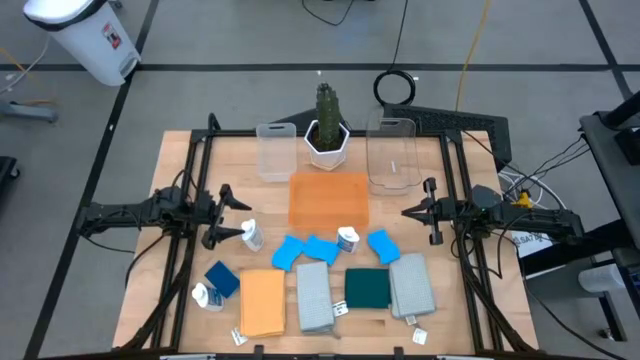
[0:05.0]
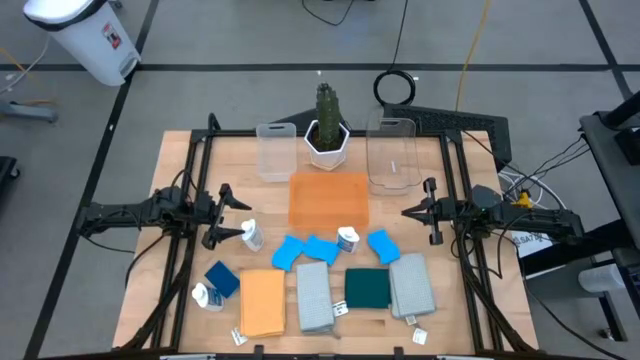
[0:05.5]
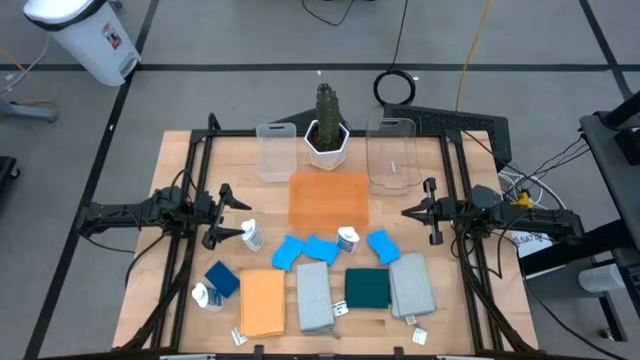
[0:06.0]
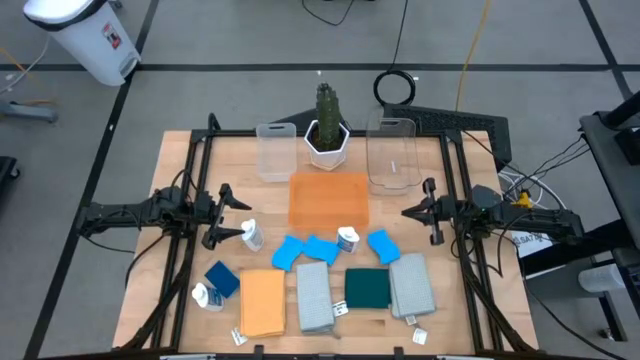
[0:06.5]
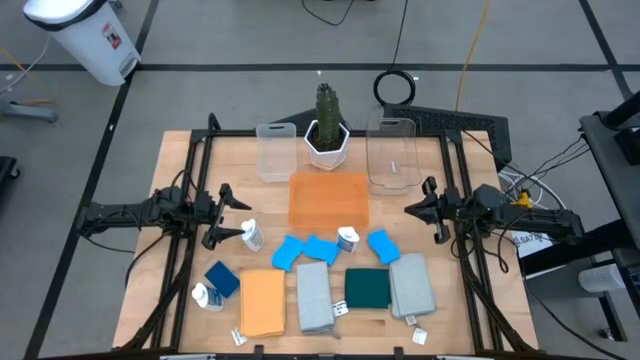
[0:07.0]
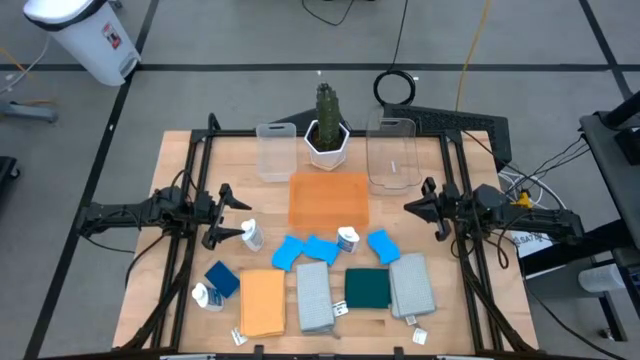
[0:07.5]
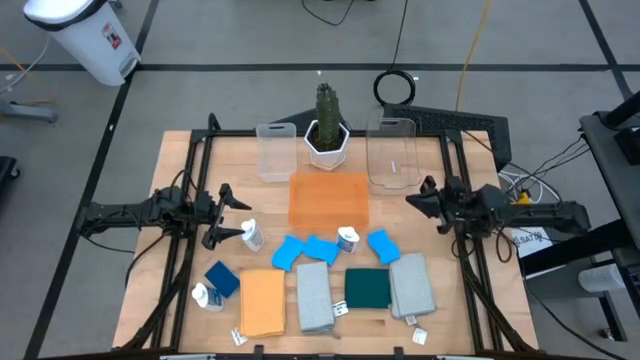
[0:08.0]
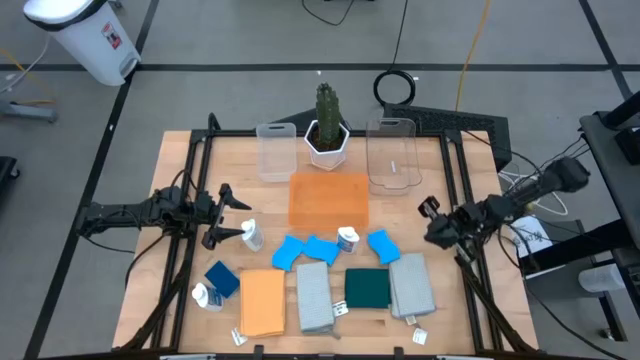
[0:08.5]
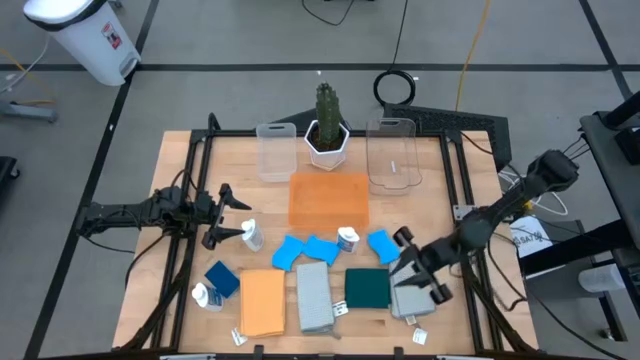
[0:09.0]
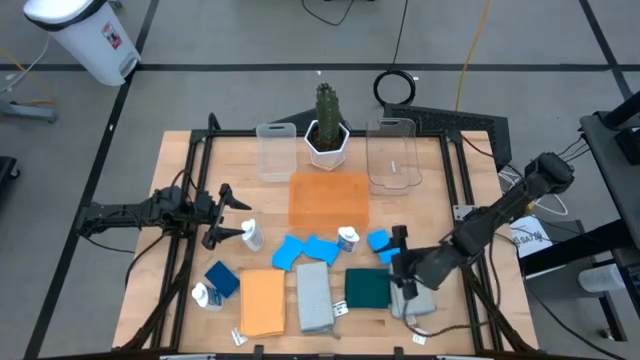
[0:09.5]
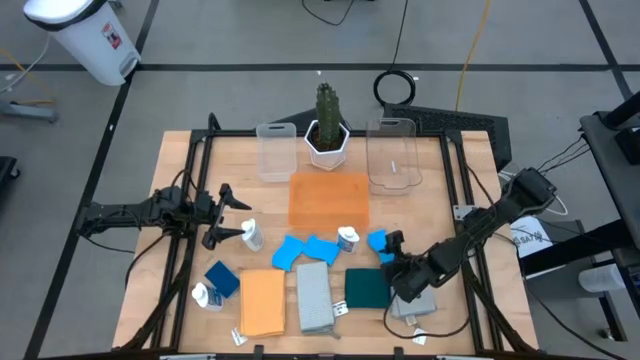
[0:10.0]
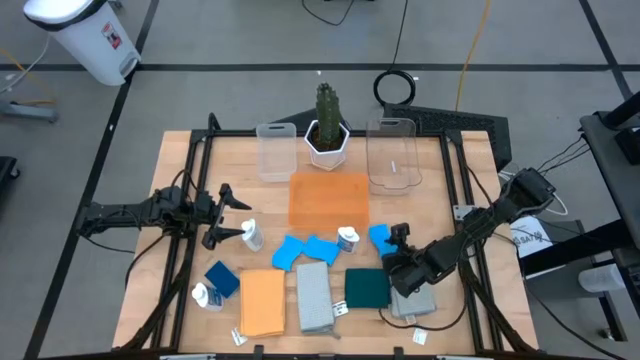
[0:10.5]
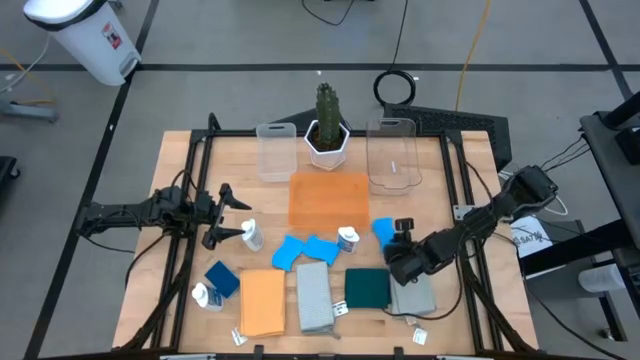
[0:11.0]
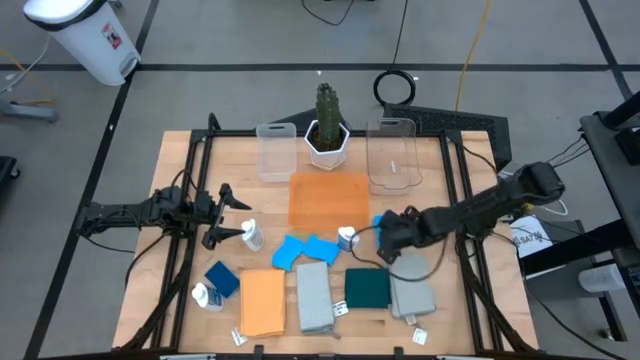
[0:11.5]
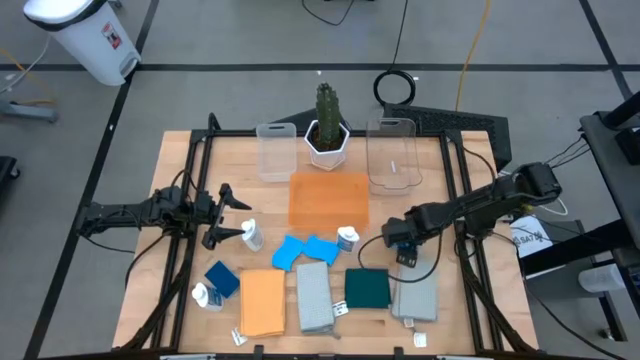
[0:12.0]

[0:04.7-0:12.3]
Task: Pick & Place Kitchen Items
Put the blue sponge into the white bin

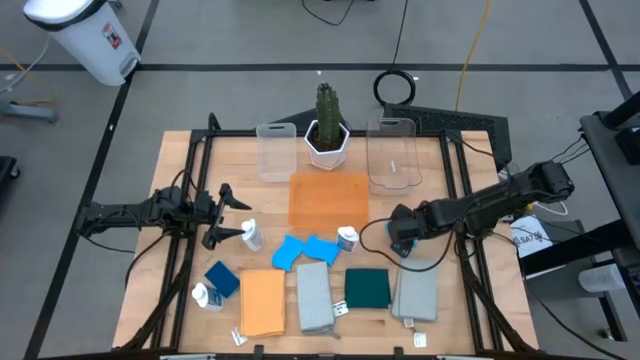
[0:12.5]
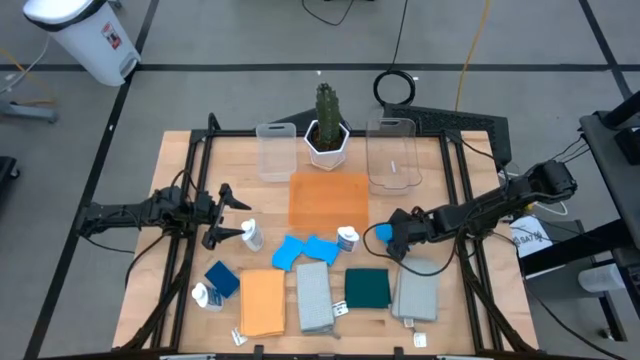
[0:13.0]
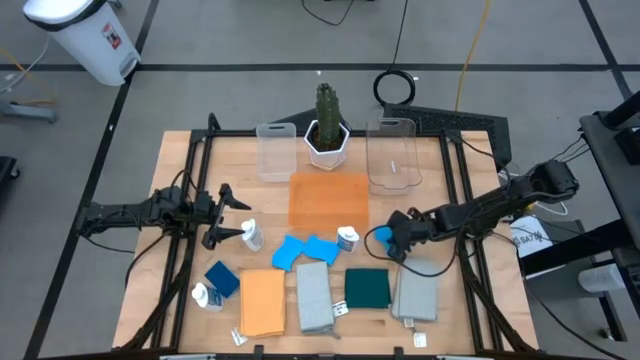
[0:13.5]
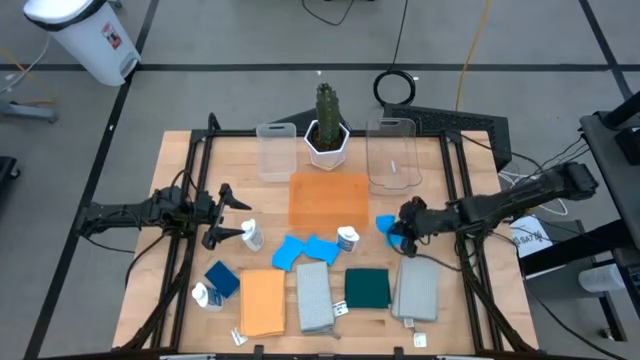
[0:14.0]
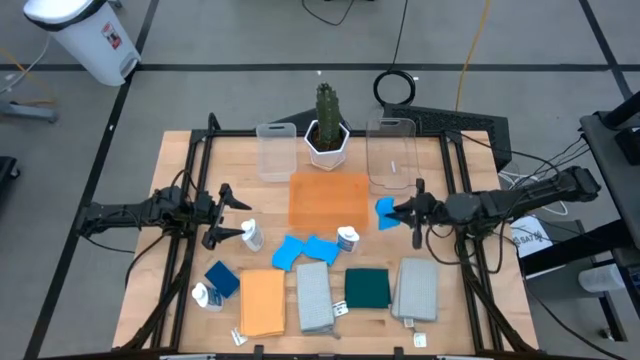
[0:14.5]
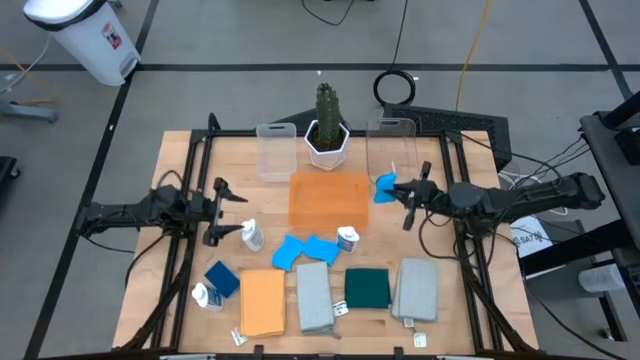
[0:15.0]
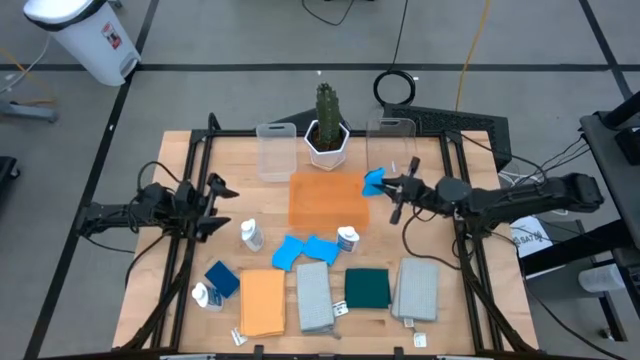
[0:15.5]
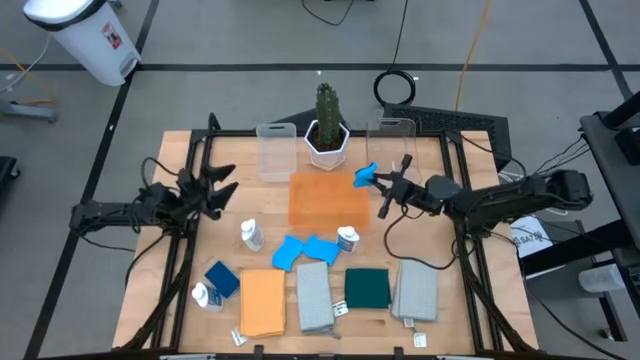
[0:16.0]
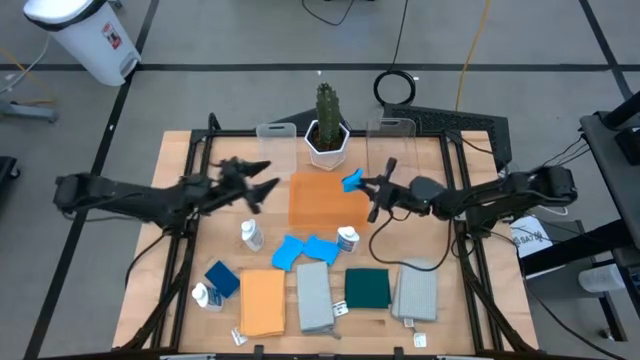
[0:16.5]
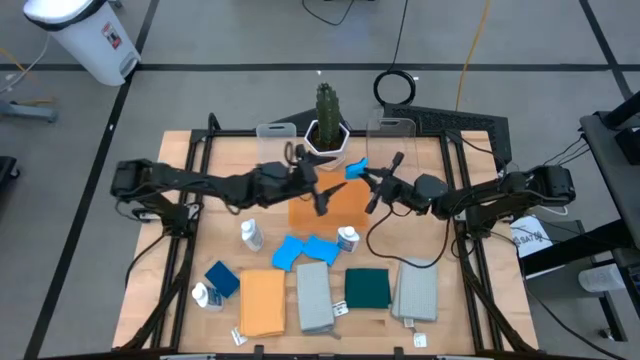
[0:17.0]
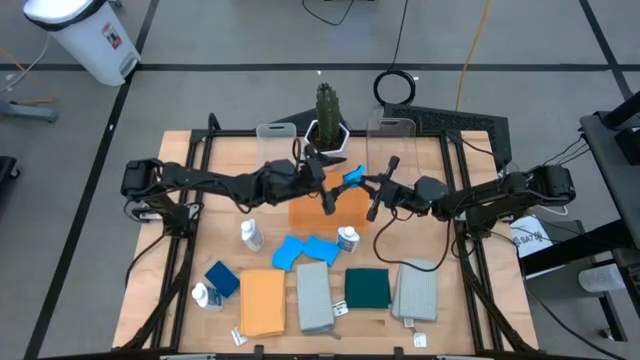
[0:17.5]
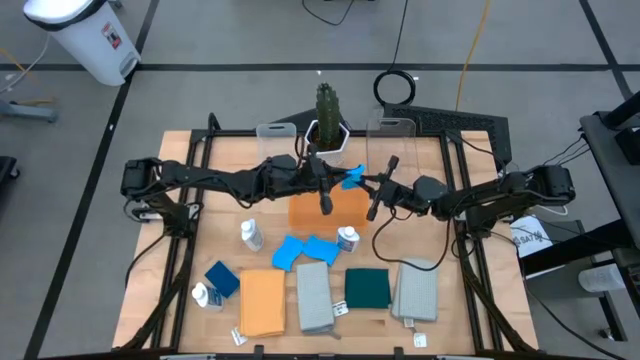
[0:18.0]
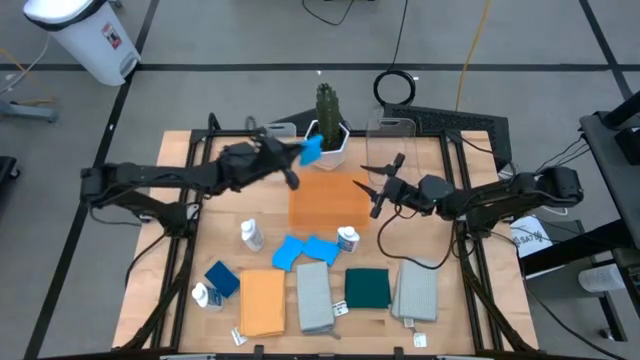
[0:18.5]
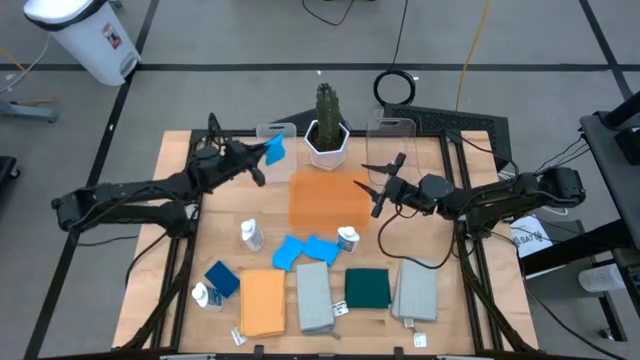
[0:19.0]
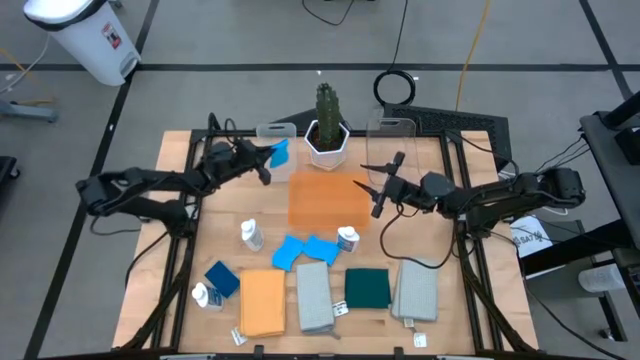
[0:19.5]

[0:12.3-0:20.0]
Put the blue sponge into the white bin

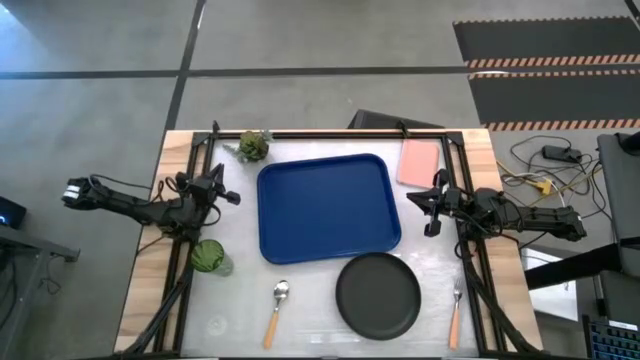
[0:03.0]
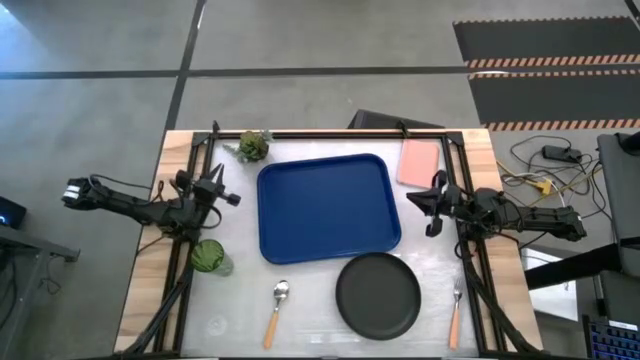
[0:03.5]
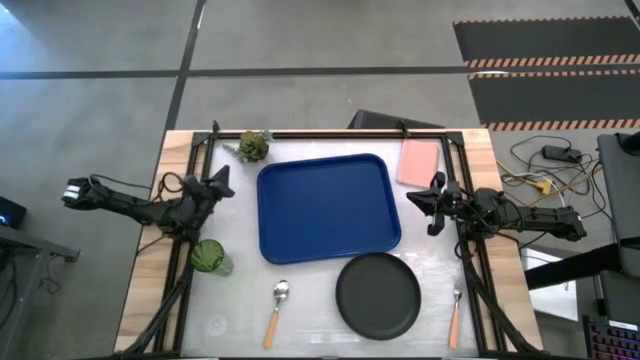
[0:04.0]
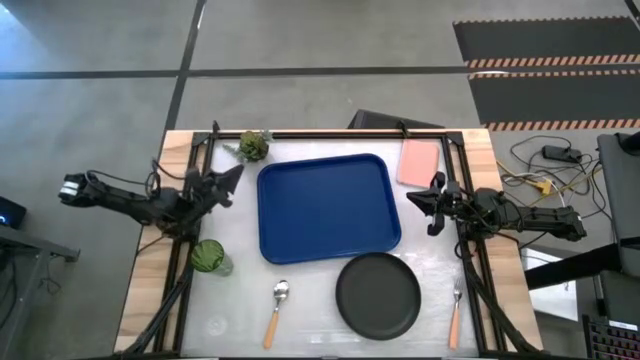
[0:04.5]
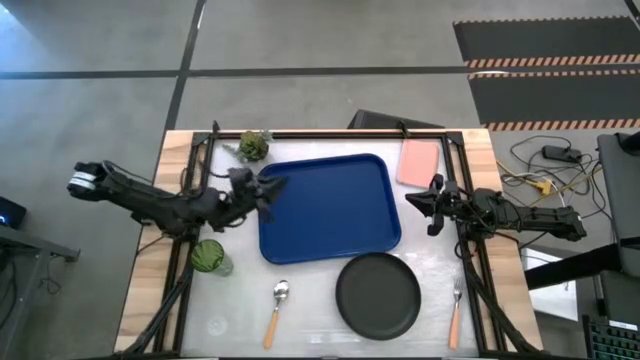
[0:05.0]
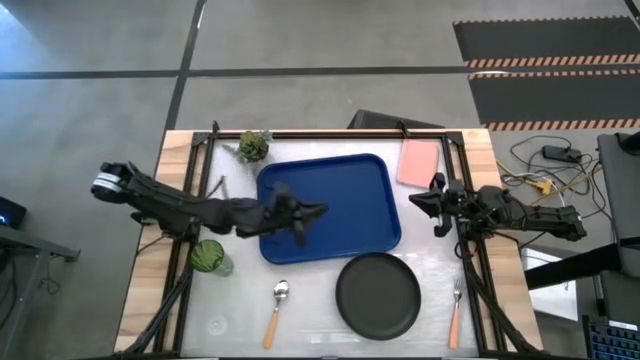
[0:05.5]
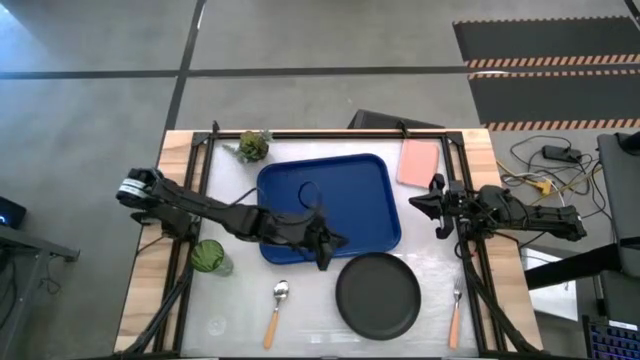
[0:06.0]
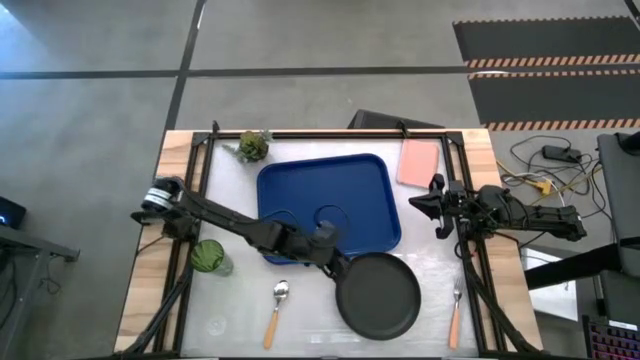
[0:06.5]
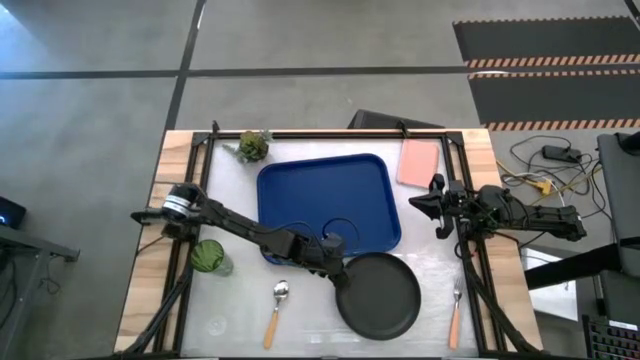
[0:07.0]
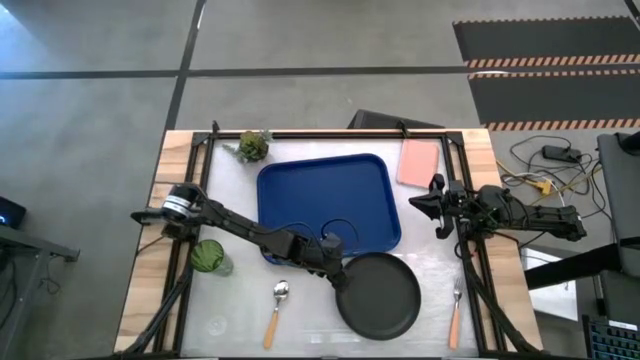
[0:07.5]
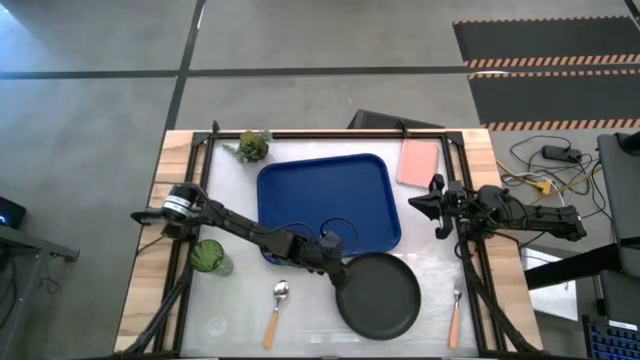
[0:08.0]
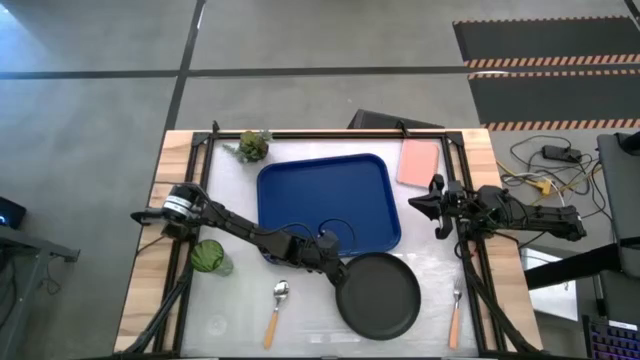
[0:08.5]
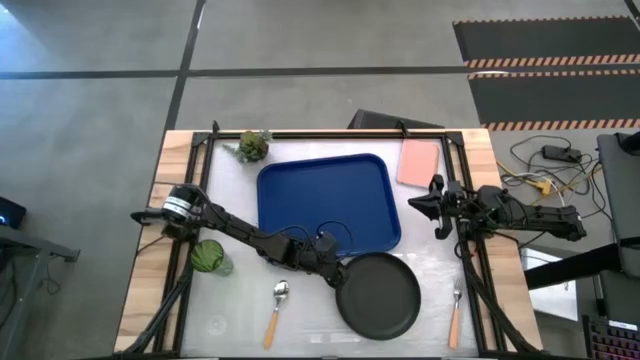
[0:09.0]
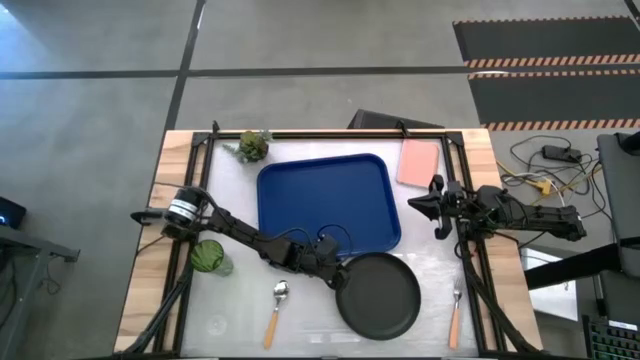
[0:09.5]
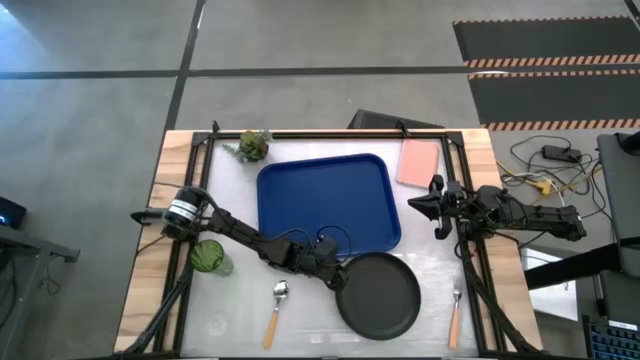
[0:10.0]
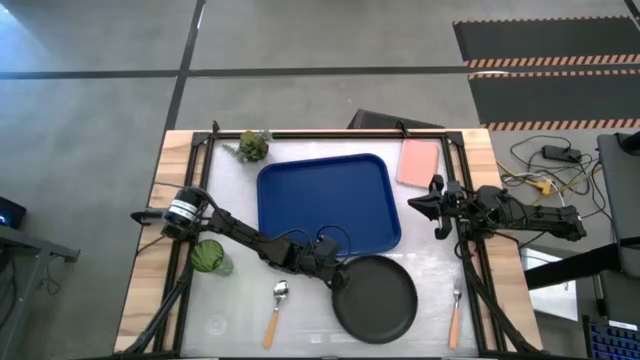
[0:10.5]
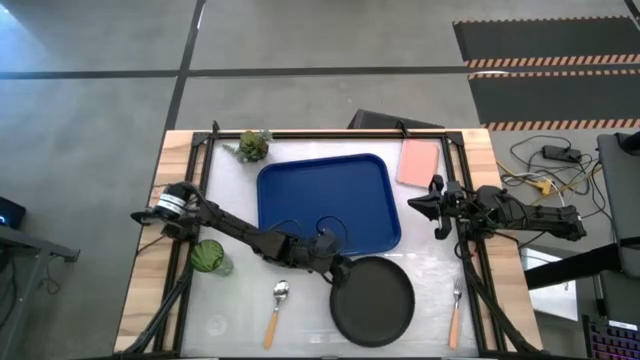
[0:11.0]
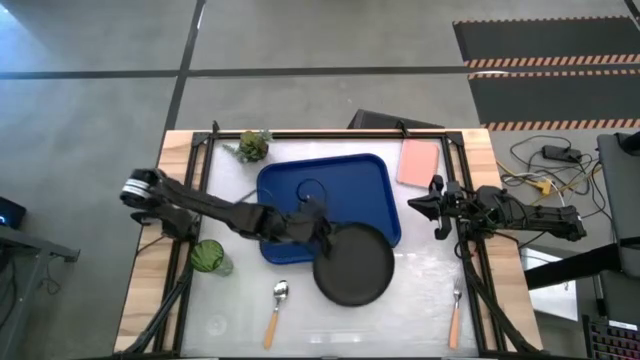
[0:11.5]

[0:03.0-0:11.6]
Task: Pick and place plate/cup/fork/spoon on tray
Put the black plate on the blue tray
